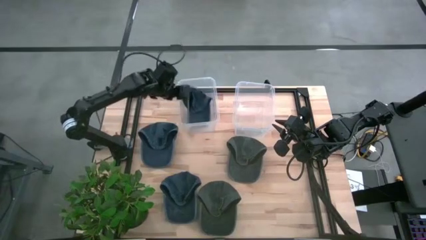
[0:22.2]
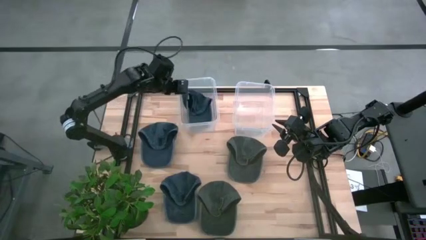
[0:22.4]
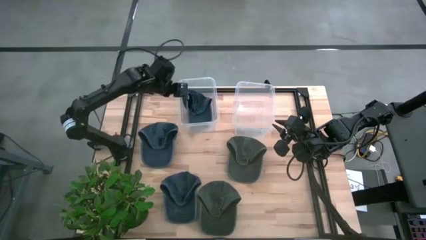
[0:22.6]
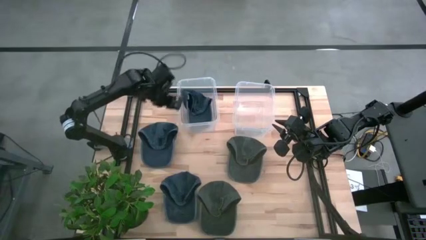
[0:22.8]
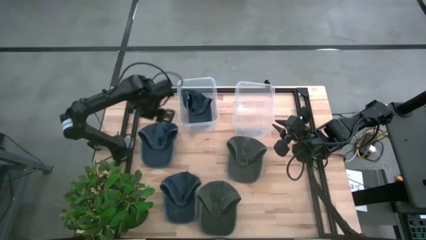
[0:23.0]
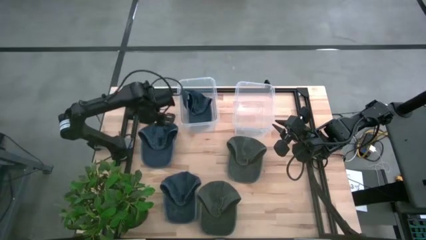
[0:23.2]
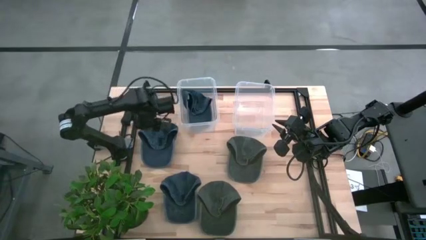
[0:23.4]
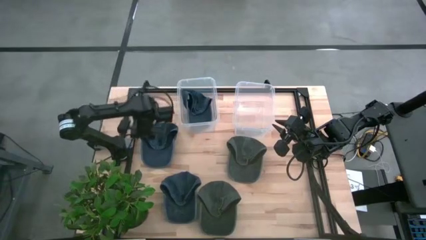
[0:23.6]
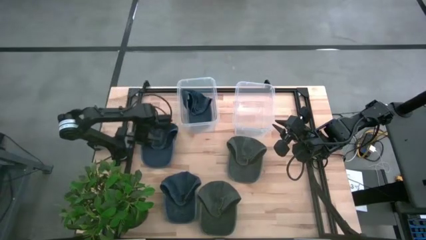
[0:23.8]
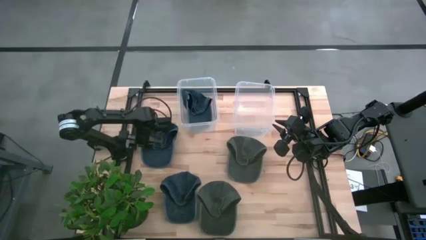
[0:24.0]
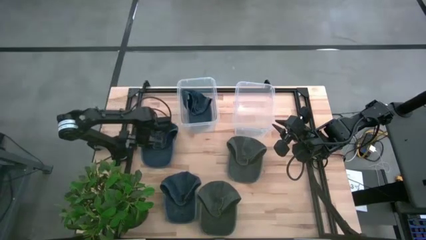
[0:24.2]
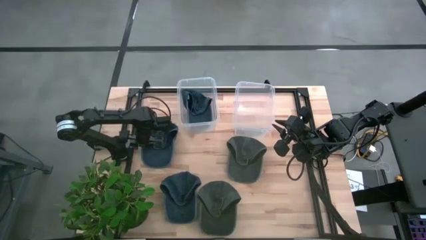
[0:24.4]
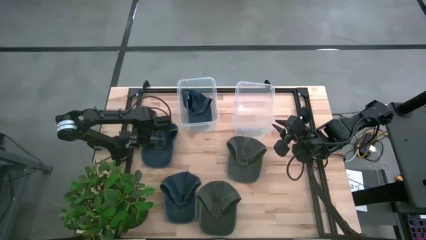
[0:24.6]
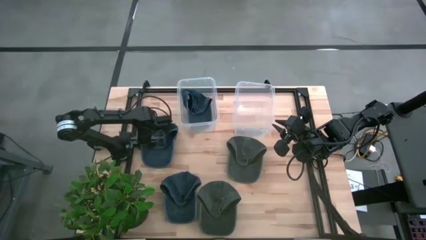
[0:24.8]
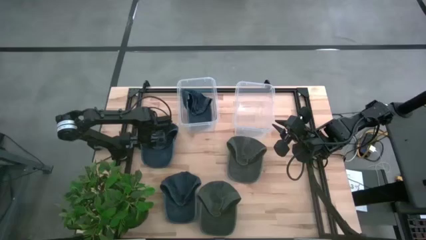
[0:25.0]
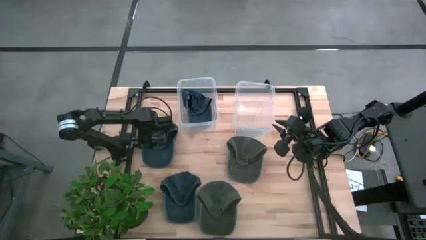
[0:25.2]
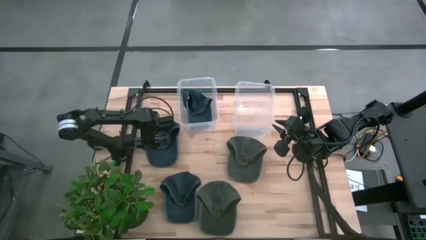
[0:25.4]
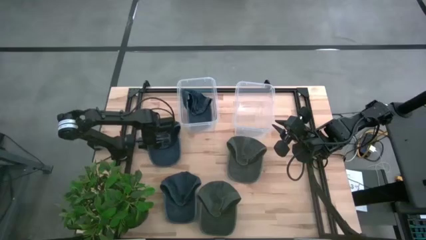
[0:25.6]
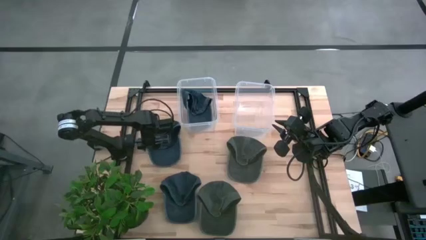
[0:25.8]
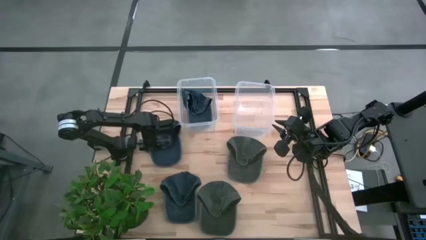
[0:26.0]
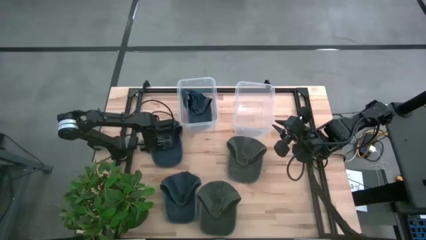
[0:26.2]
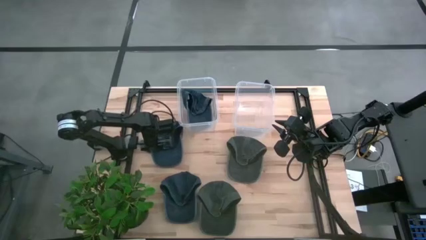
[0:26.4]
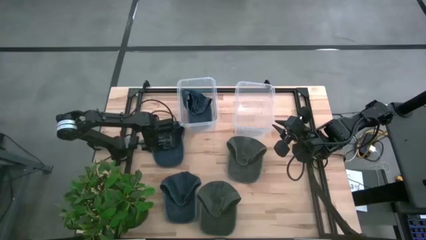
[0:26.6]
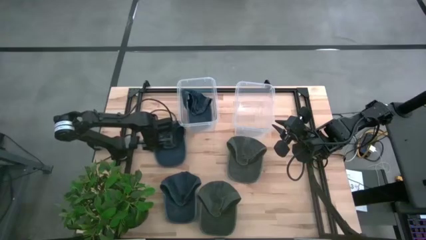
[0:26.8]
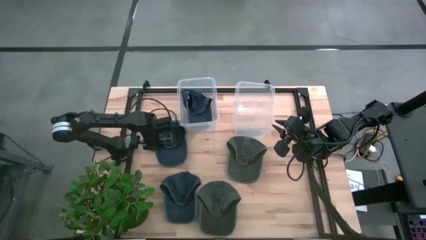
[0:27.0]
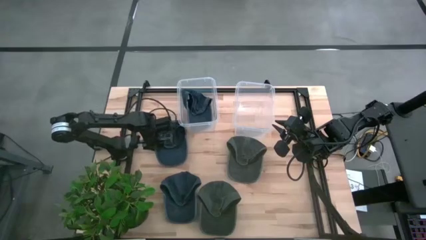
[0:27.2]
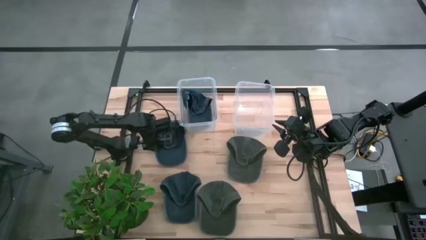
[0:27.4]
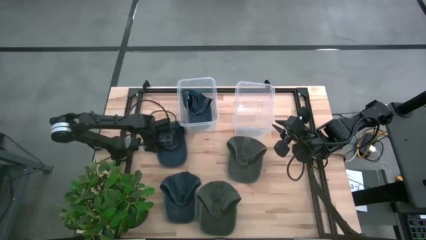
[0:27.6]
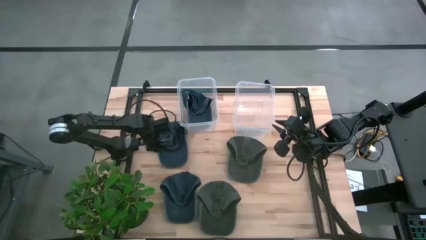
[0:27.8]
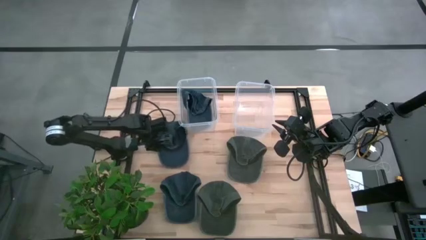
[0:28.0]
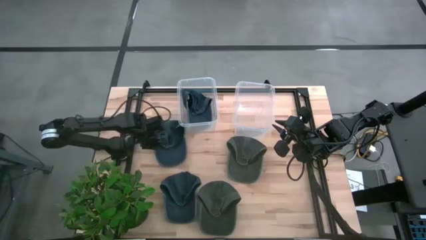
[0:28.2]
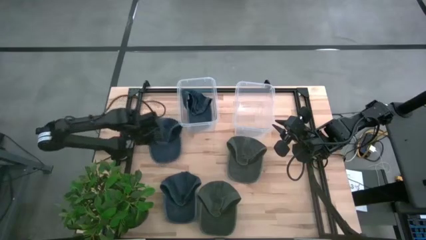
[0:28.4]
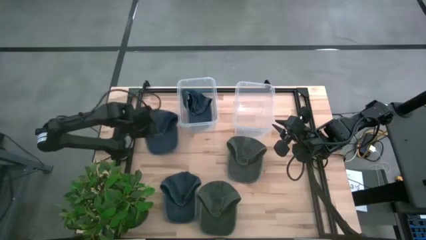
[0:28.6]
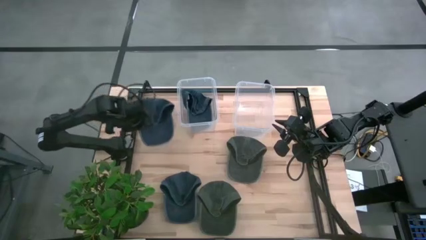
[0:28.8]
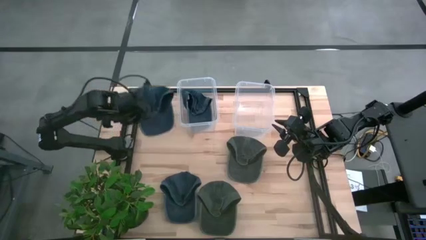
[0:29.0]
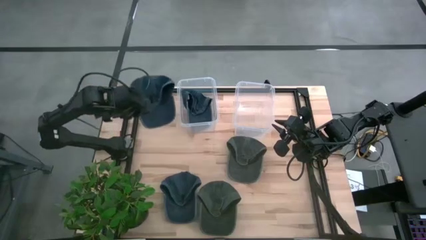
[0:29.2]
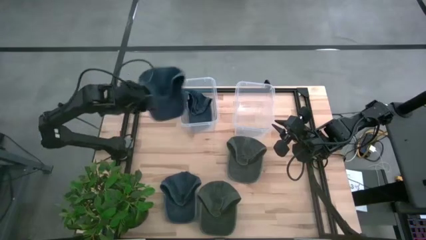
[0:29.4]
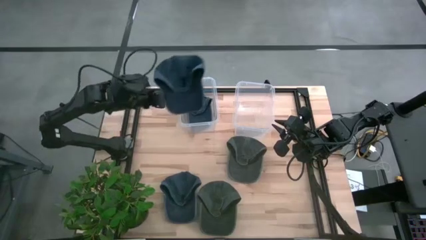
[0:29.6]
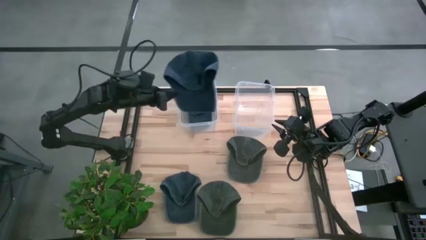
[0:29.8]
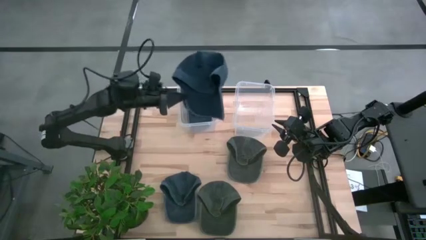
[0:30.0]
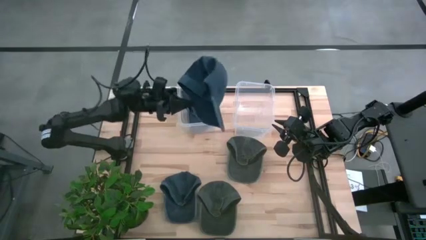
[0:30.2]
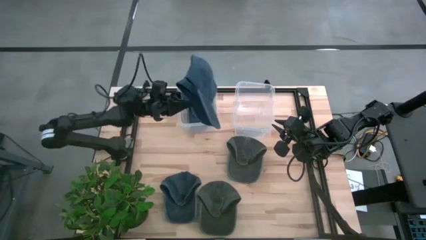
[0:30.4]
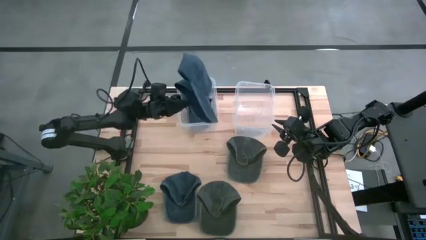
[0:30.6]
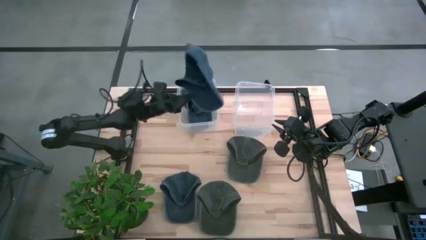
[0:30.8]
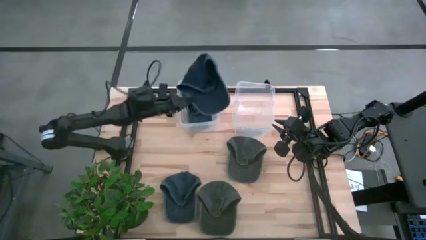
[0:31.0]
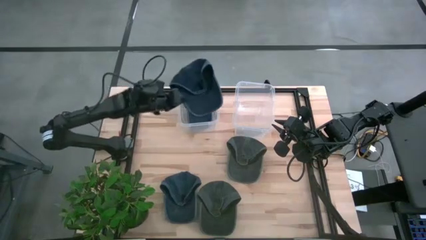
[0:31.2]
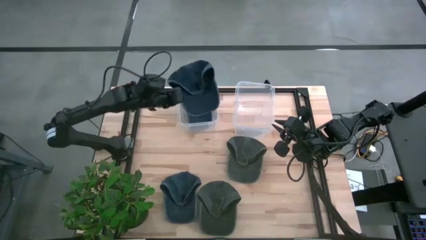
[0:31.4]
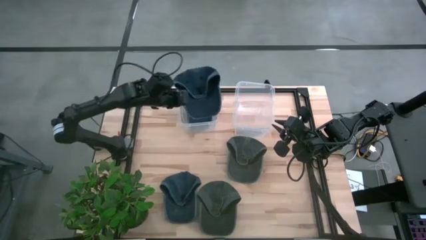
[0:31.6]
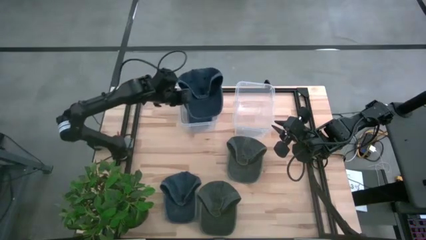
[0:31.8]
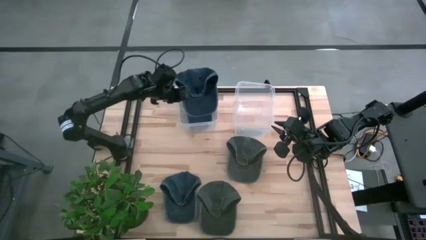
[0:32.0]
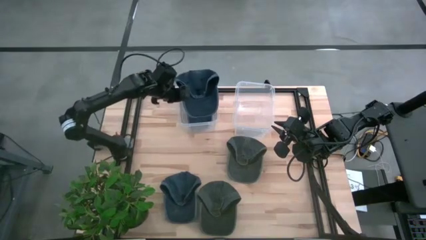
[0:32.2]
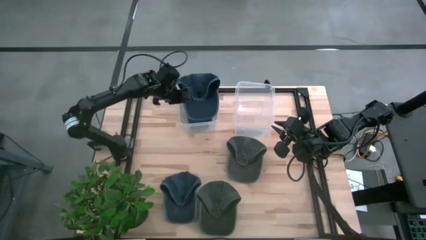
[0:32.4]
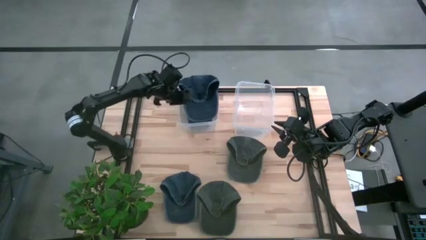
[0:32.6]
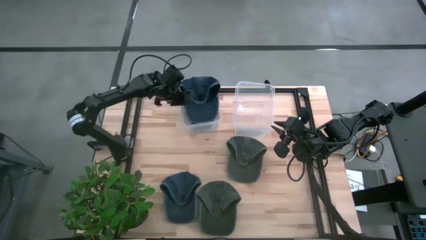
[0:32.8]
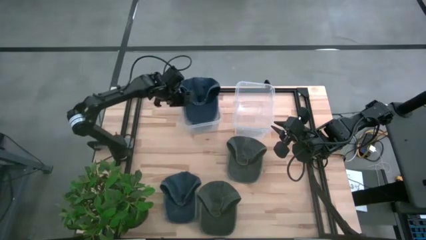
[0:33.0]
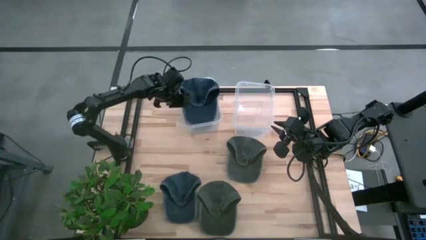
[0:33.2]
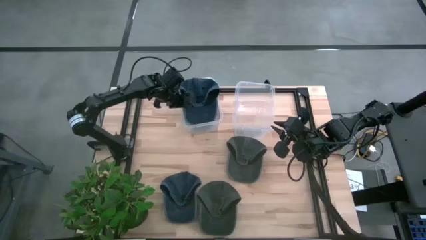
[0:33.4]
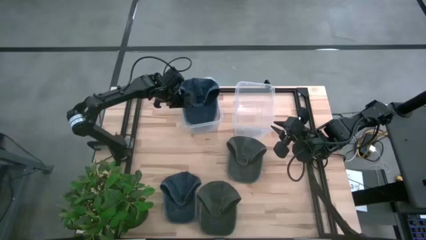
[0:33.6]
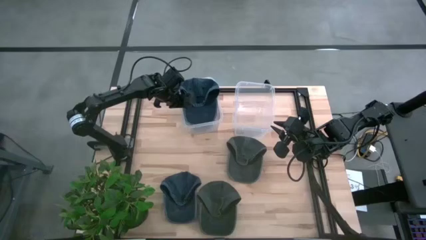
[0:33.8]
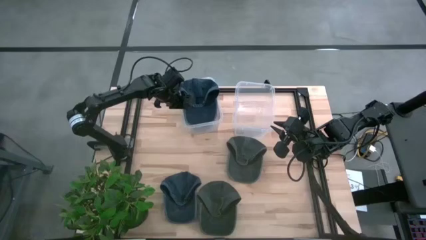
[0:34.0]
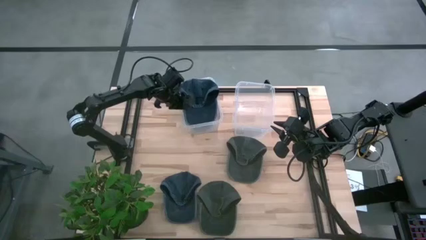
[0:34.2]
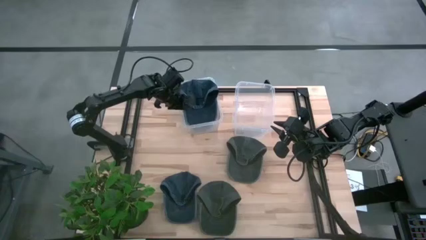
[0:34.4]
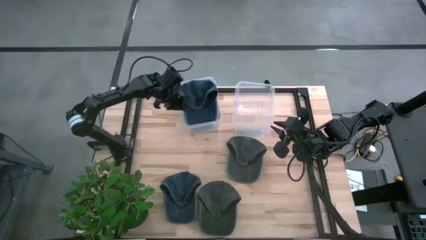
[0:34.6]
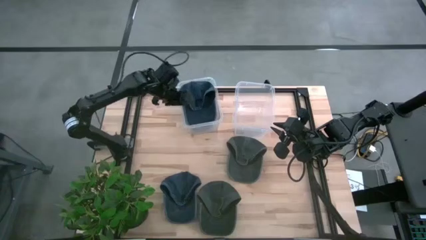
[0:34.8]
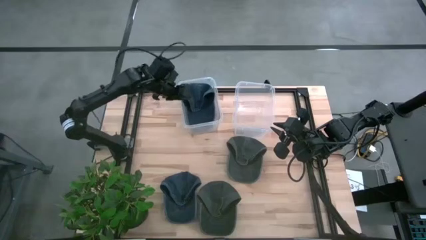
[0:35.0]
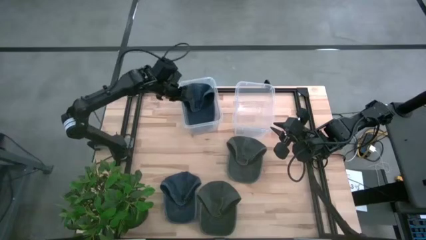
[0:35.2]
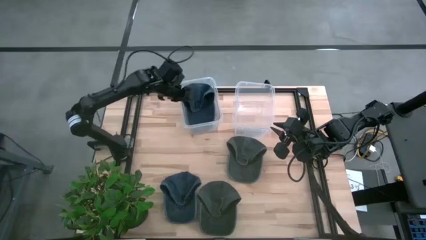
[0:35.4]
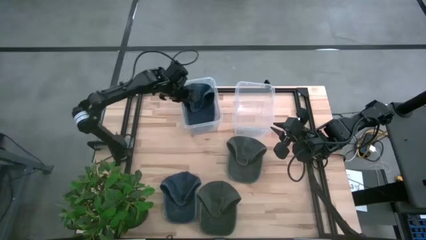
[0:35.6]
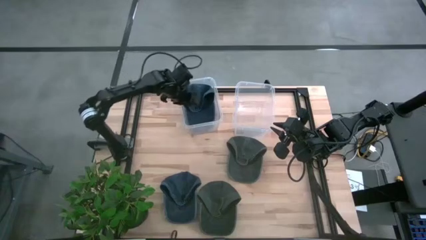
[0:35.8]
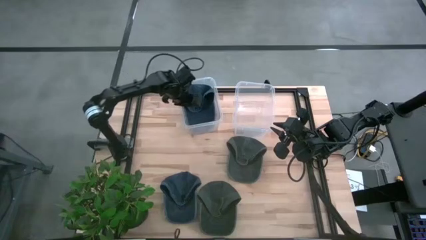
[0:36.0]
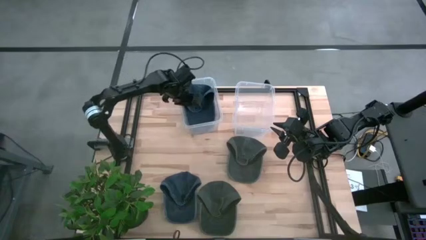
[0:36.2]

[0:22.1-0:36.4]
Task: Pick & Place hat
Put the top blue cap into the left transparent bin
